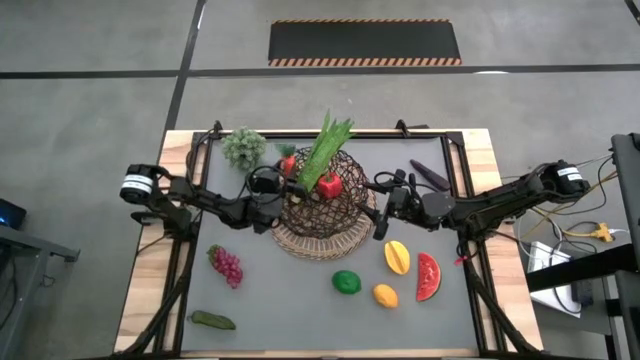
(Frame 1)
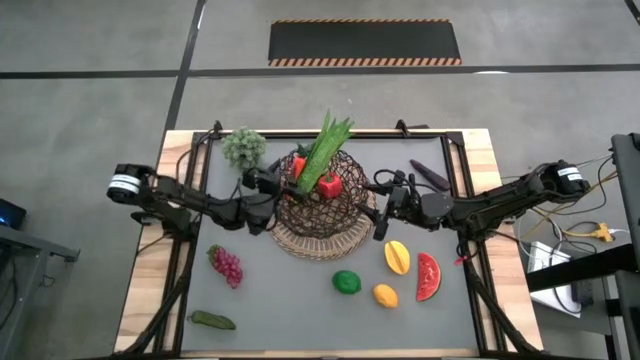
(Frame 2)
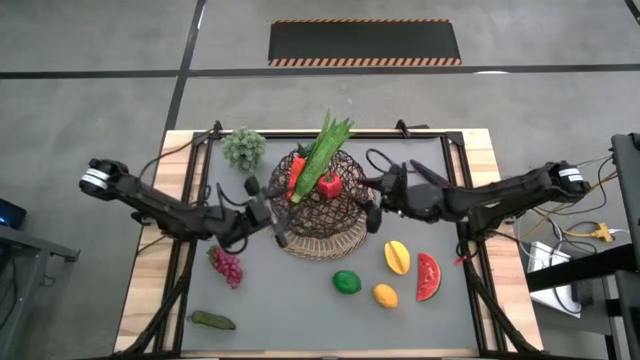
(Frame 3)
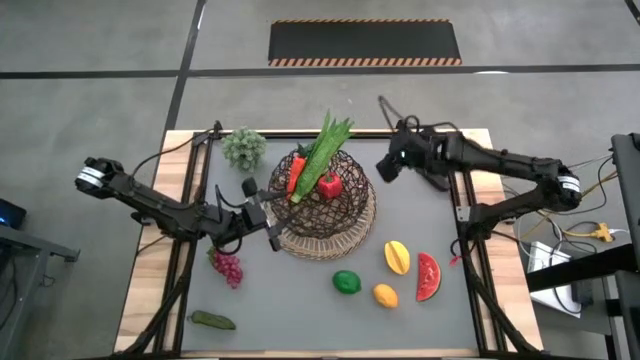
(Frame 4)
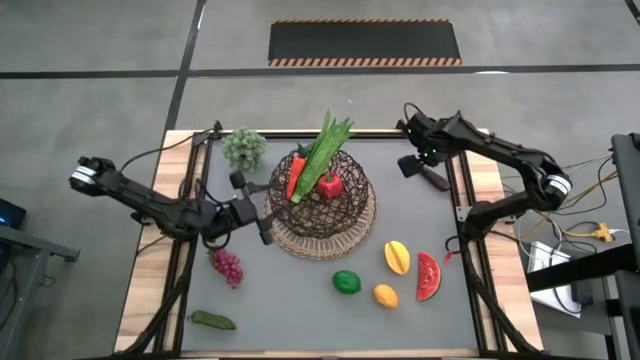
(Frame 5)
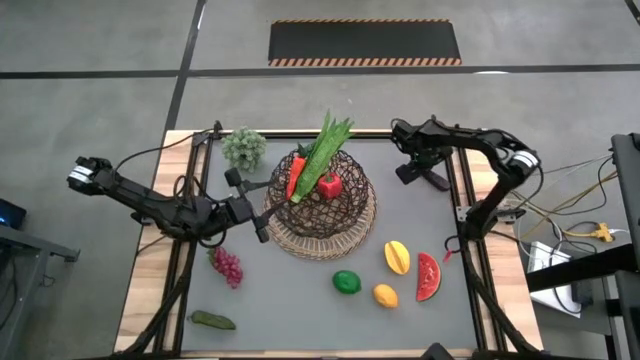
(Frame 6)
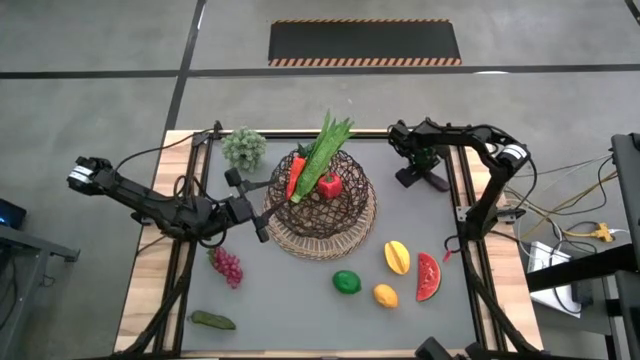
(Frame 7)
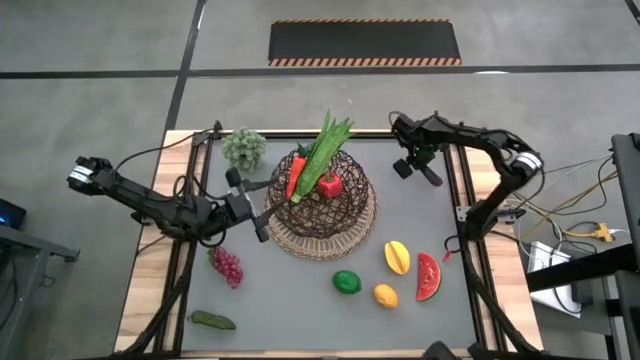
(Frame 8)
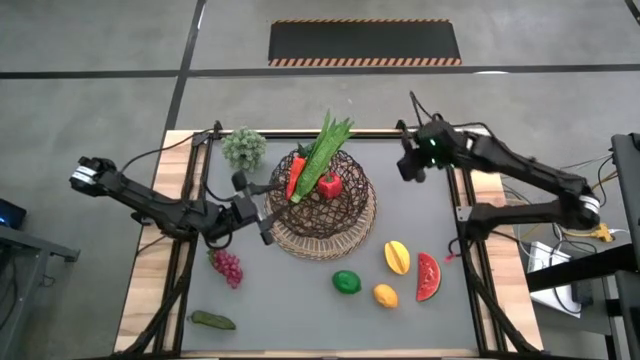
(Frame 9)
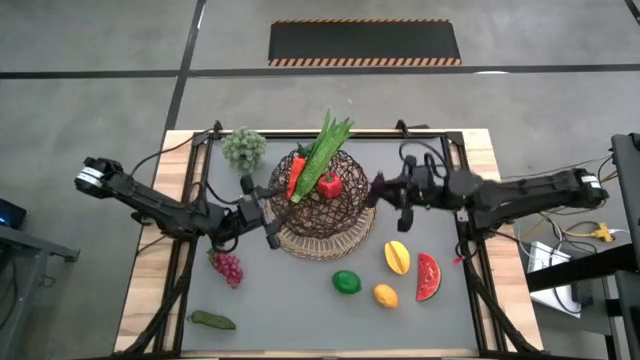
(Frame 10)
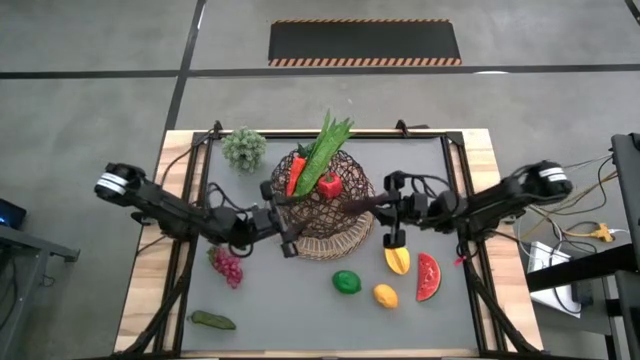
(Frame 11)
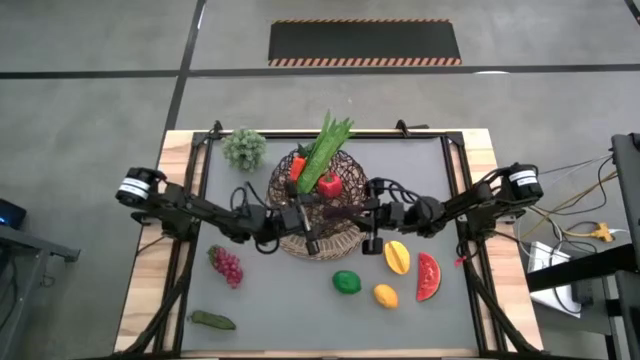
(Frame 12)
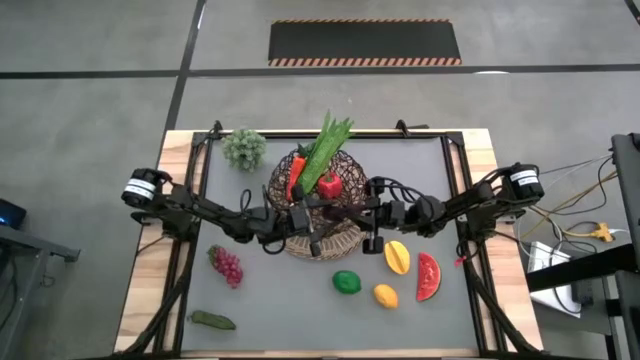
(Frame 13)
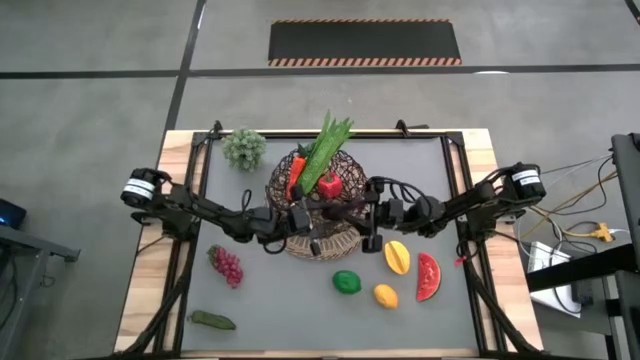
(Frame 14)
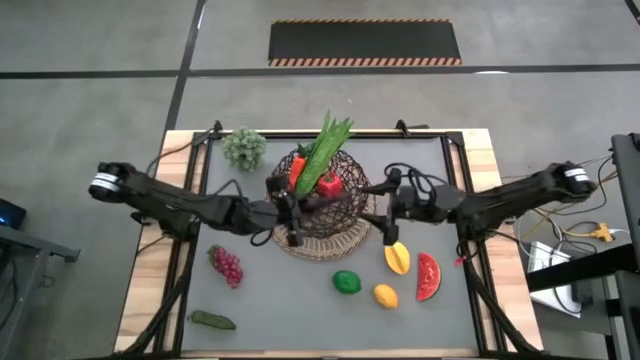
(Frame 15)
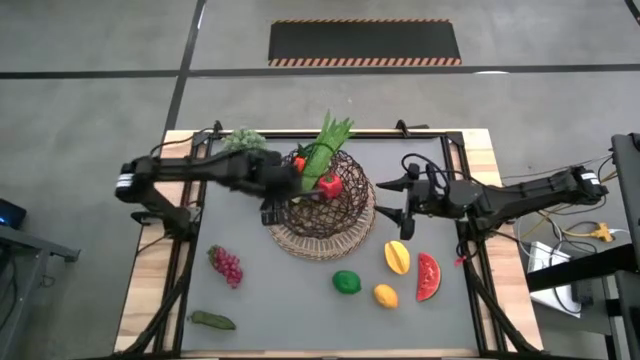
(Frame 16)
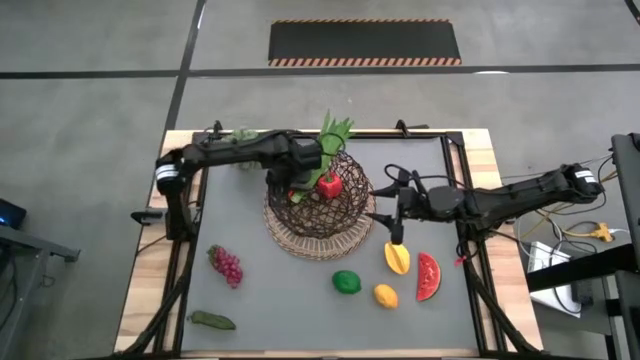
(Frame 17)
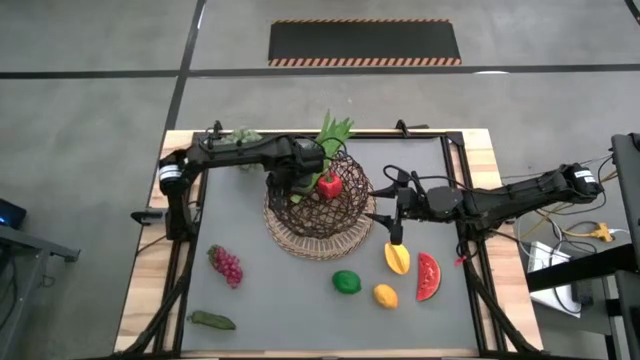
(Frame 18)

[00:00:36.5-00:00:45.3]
Task: Build produce basket
Put the purple eggplant into the basket

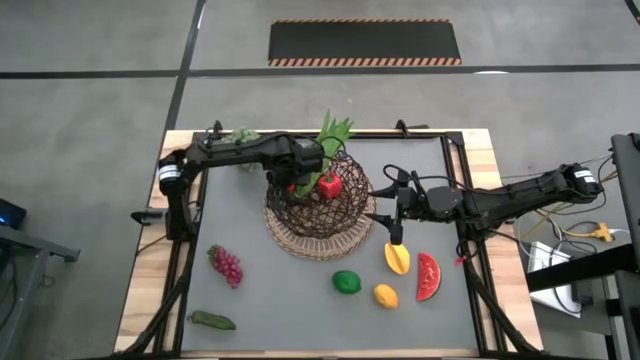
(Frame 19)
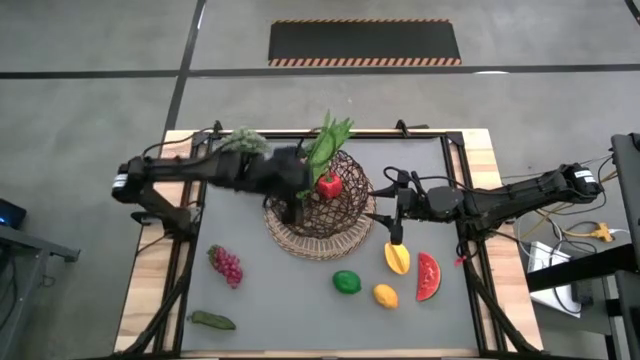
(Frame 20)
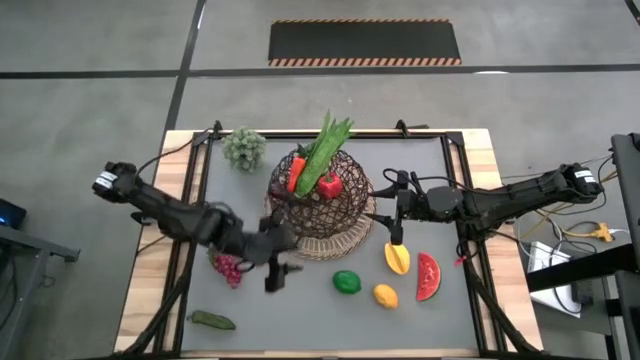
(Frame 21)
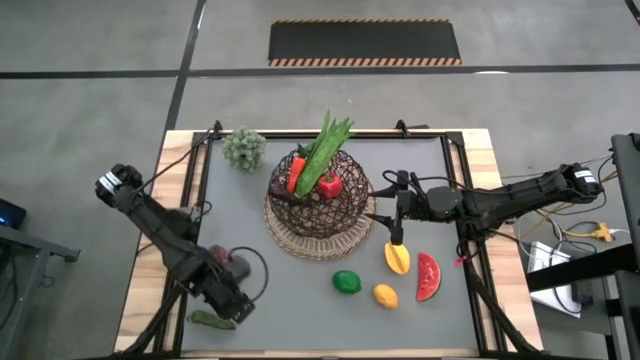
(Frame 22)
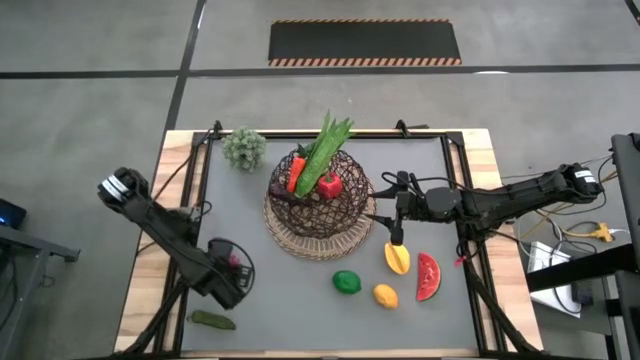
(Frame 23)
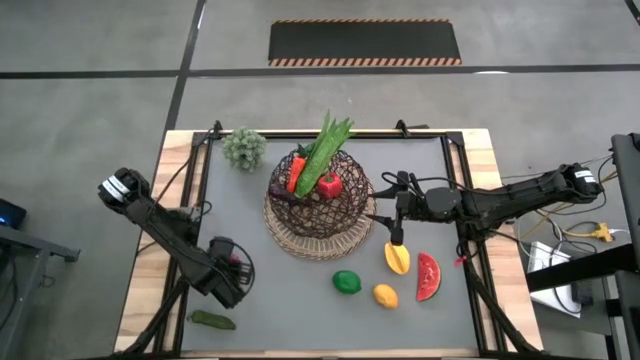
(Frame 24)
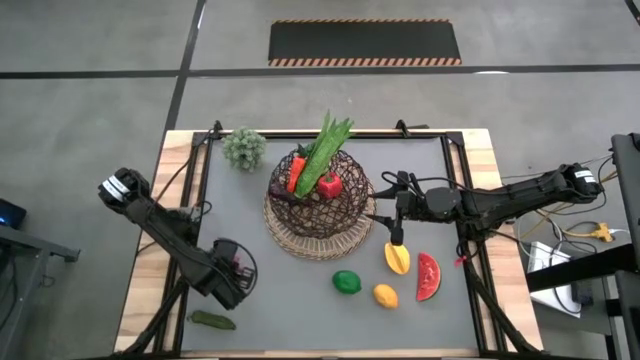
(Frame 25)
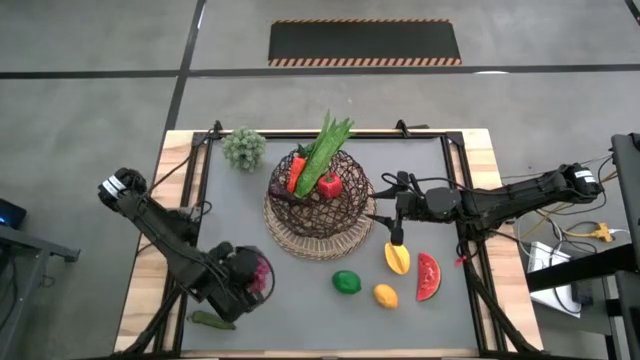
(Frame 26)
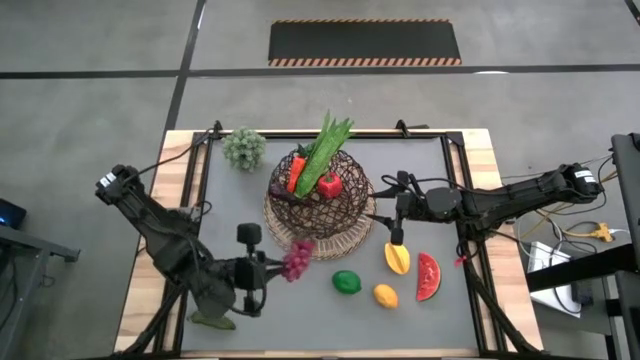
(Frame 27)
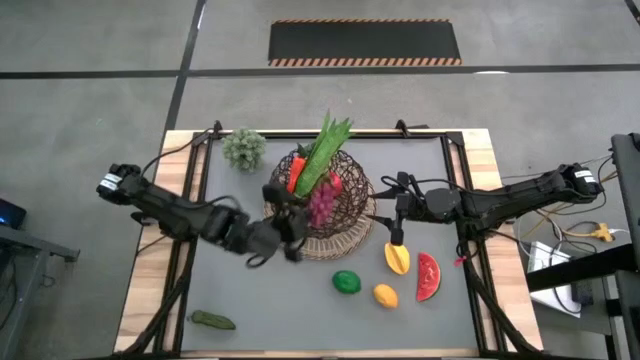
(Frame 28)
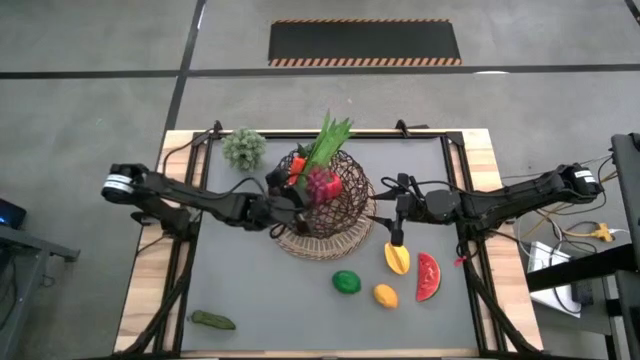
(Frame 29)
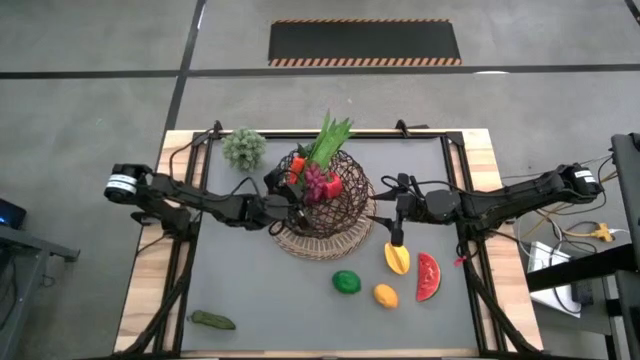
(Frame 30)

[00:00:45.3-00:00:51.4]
Put the purple grapes into the basket

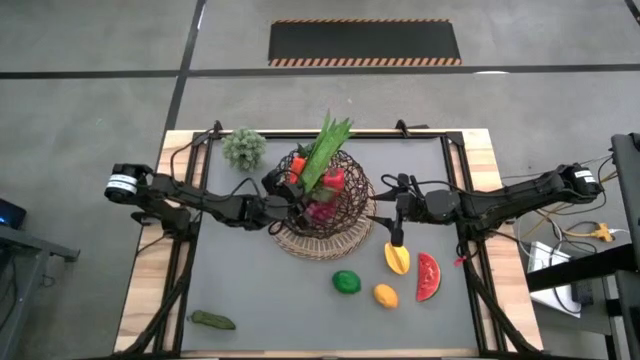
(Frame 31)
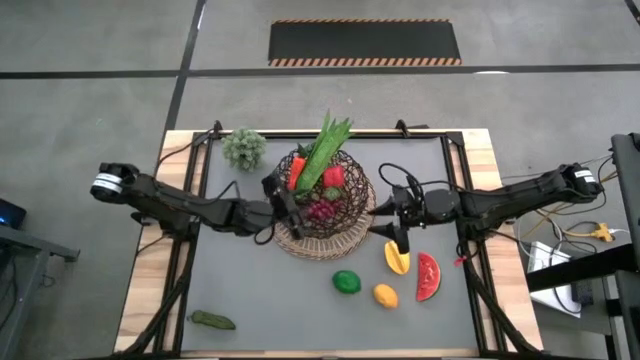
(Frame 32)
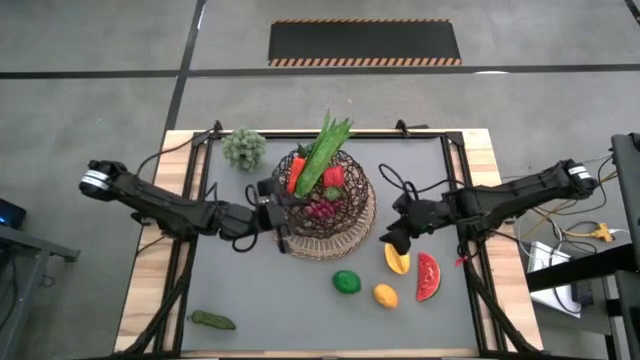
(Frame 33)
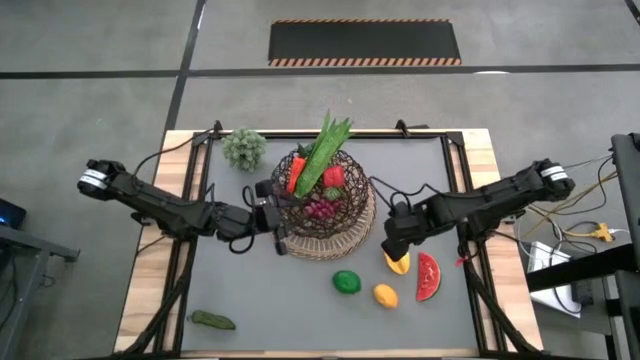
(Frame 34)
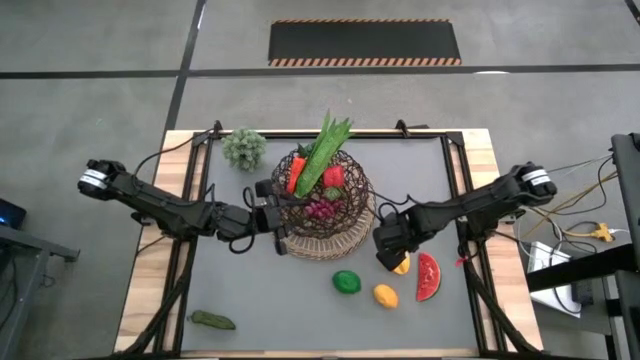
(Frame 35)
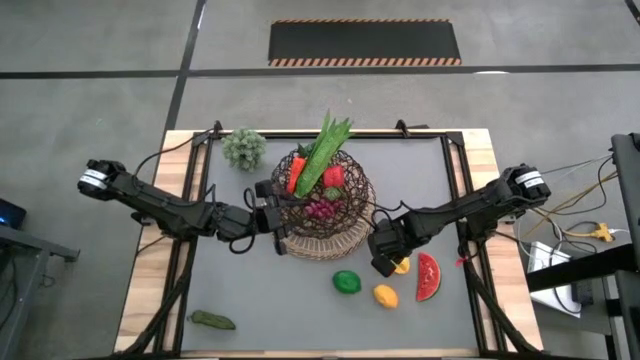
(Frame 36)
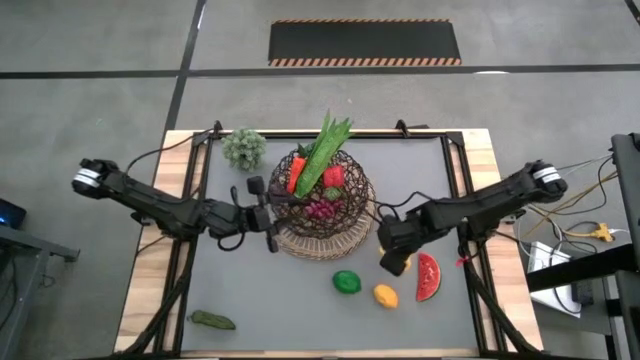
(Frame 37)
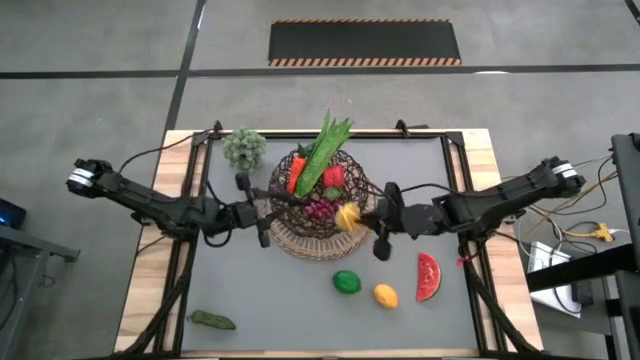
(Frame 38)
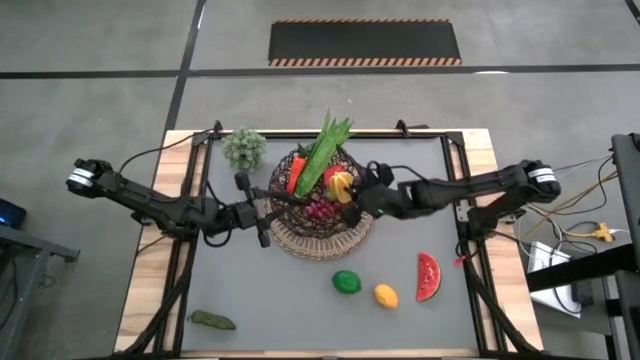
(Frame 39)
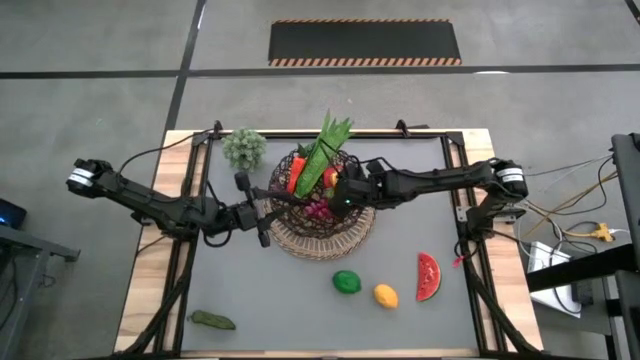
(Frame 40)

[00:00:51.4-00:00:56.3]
Put the yellow star fruit into the basket
